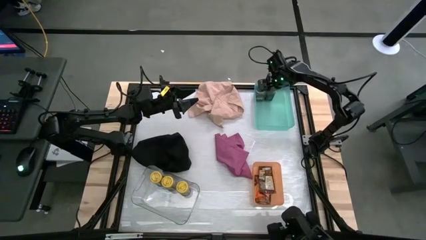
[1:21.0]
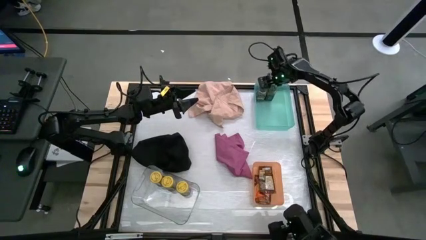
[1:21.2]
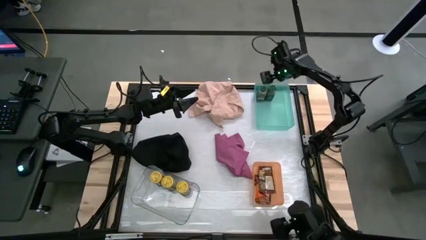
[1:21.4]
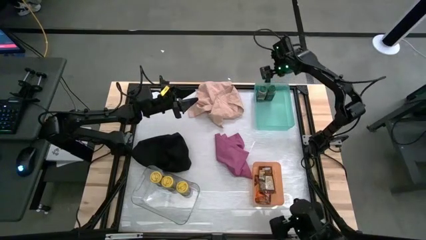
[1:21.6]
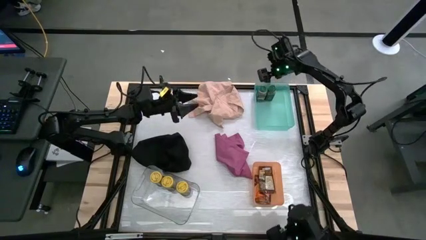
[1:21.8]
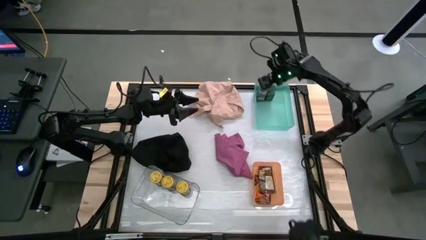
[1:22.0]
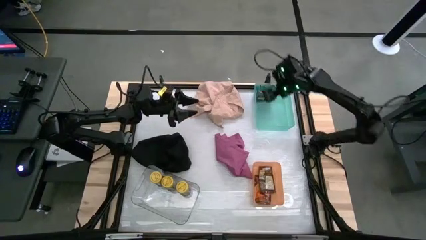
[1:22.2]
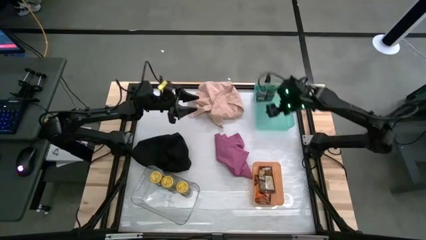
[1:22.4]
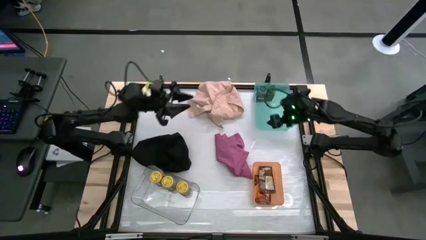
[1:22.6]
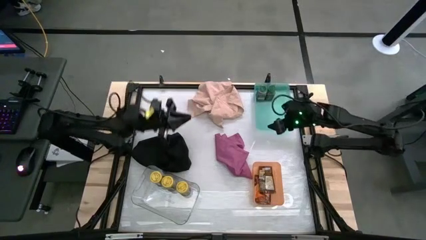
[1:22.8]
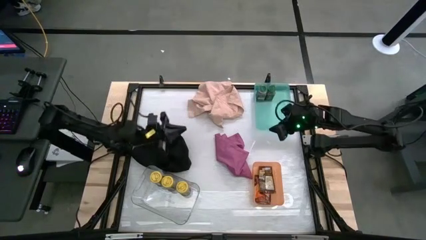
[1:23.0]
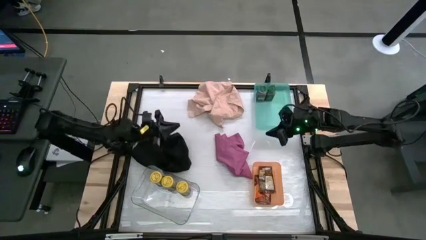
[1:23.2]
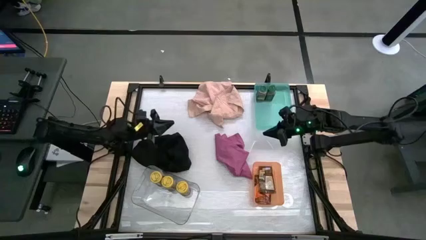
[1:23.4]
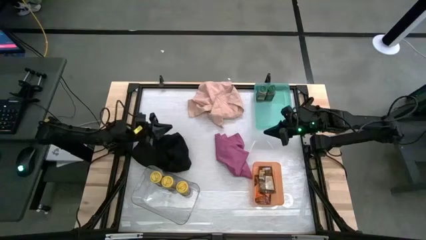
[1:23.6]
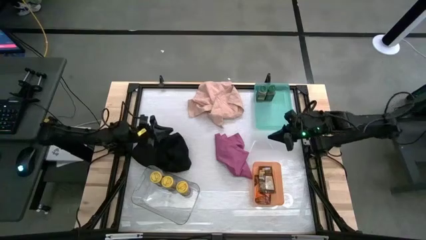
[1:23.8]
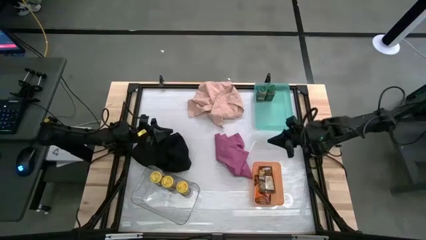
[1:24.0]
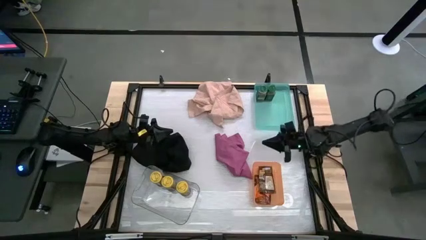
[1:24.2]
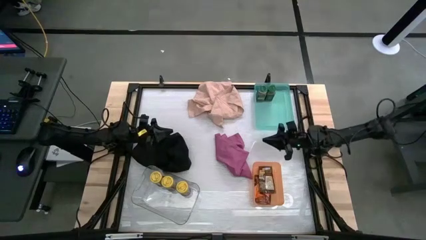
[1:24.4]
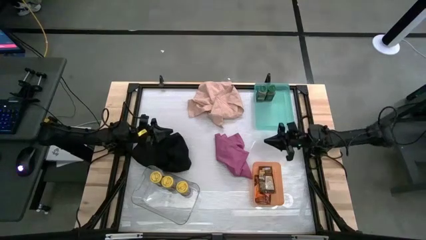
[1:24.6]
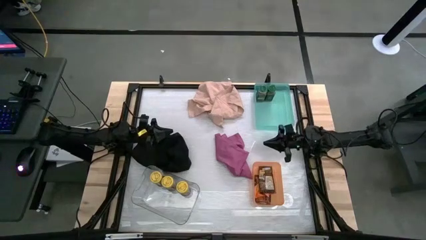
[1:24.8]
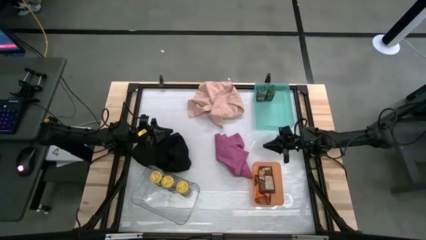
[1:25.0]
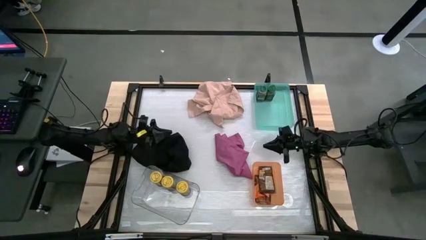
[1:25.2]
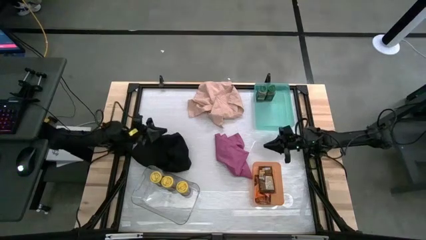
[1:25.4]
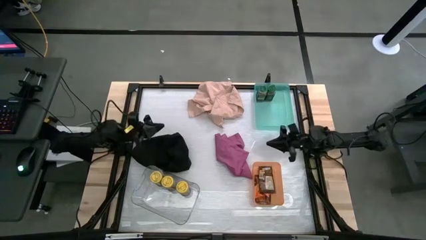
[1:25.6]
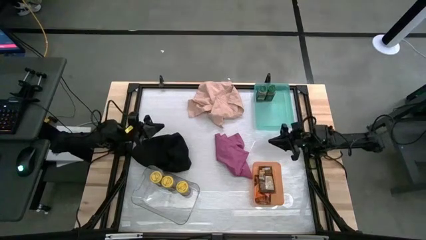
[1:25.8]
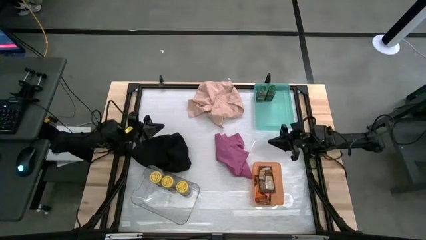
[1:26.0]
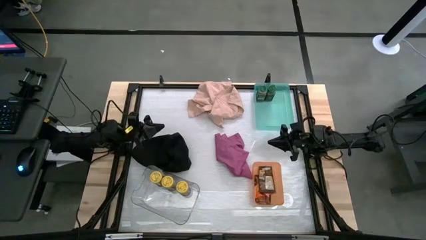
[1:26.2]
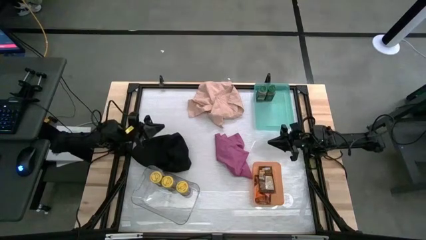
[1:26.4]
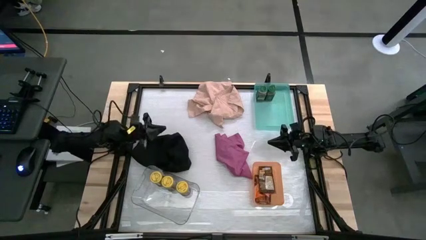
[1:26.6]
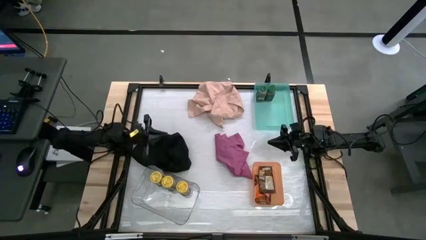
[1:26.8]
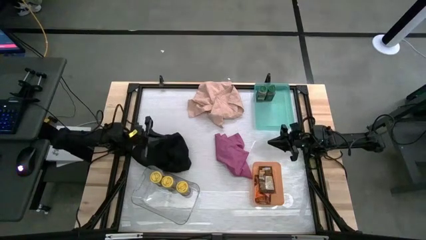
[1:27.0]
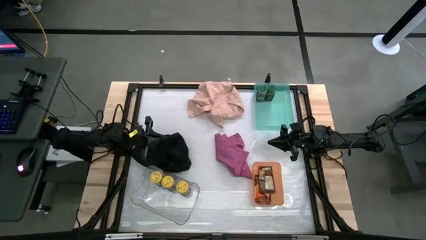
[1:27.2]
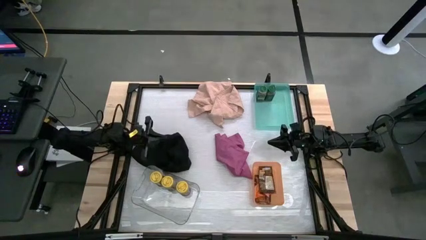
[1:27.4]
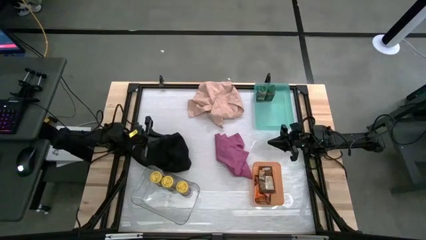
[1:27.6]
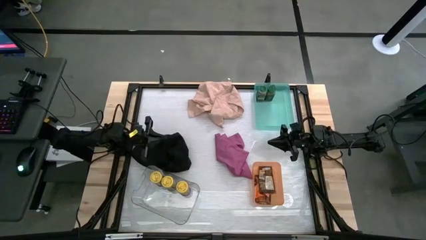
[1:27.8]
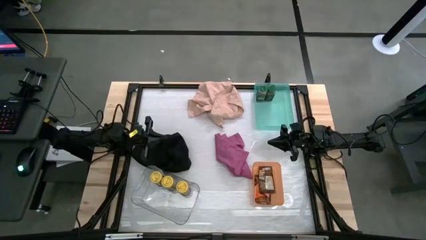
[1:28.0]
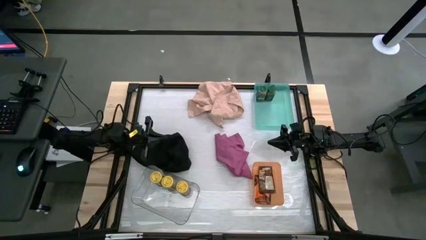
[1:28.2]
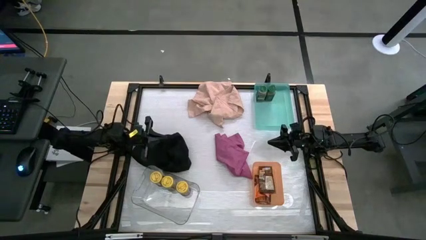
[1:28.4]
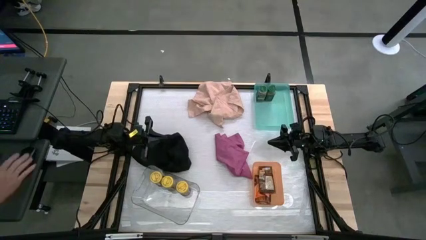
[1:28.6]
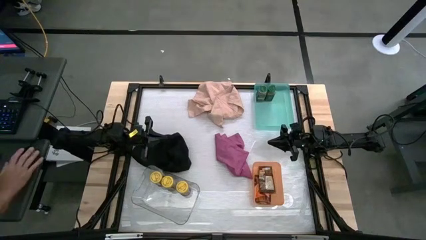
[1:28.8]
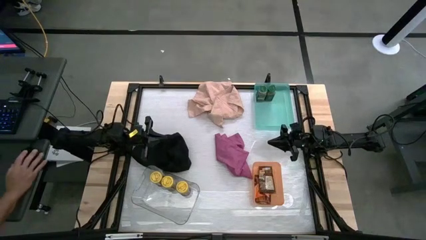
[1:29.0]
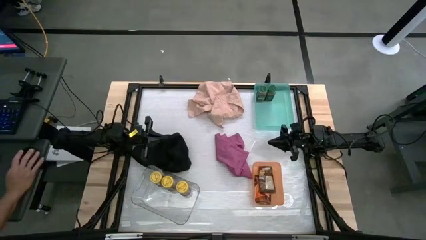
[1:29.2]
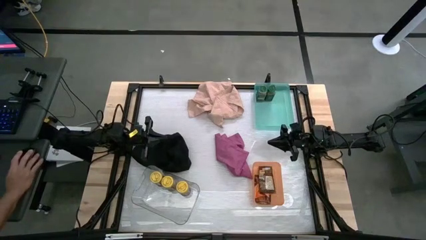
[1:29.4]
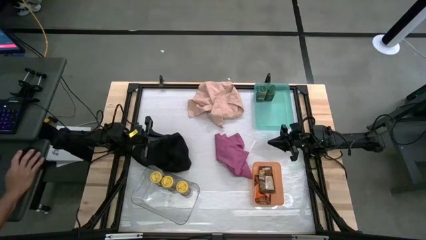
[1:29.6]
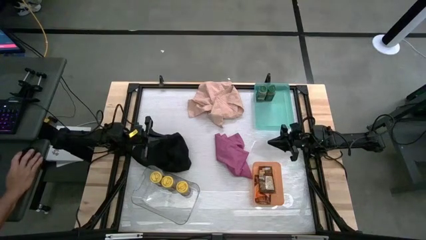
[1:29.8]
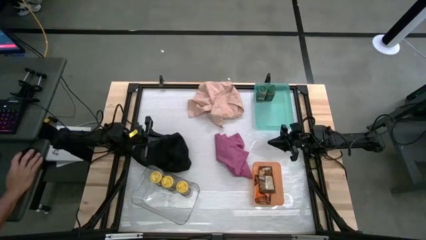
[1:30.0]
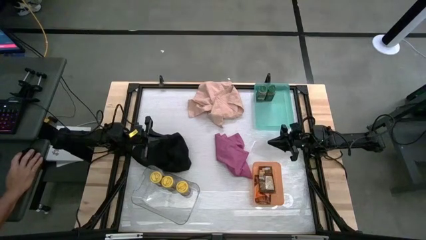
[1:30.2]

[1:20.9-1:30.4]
Task: Sort spices by type
Return to Home Position

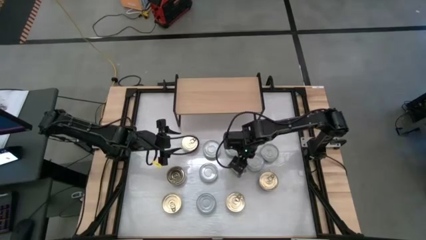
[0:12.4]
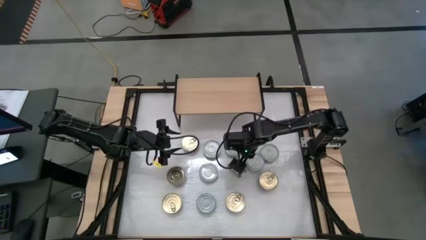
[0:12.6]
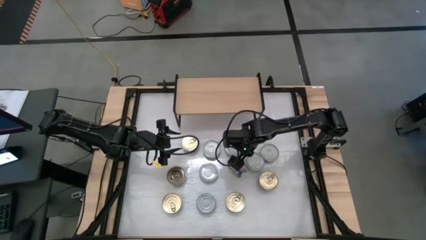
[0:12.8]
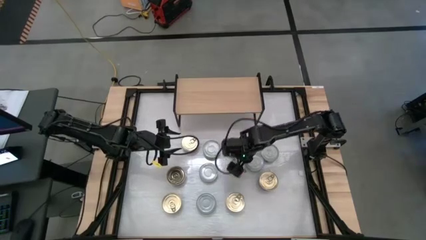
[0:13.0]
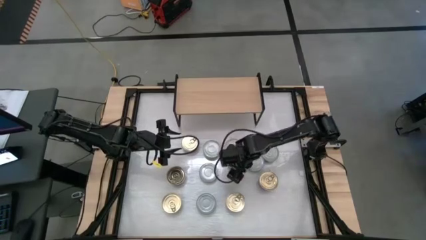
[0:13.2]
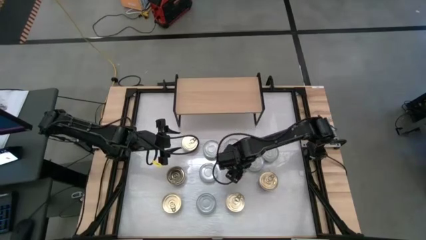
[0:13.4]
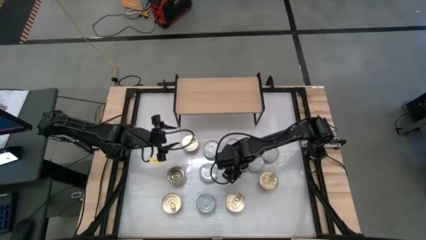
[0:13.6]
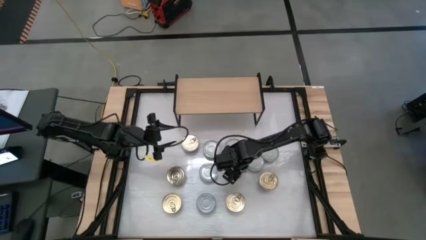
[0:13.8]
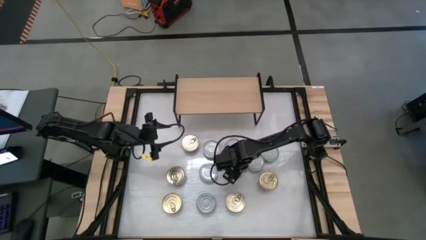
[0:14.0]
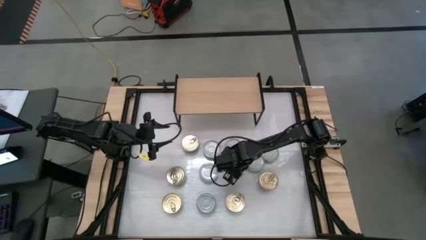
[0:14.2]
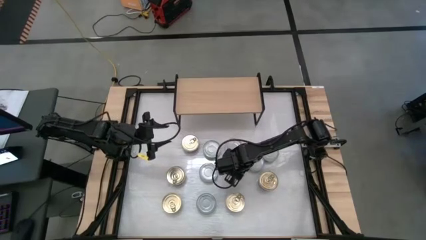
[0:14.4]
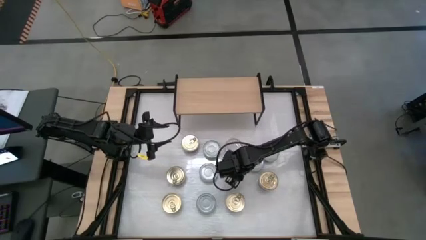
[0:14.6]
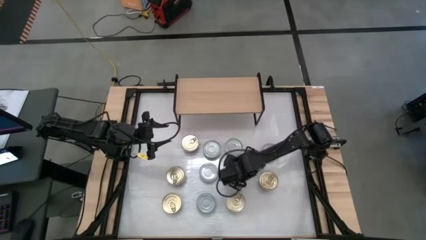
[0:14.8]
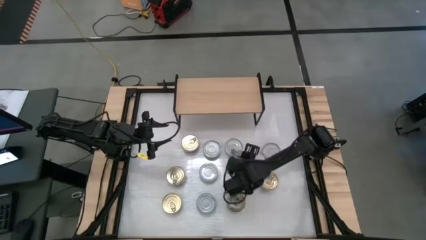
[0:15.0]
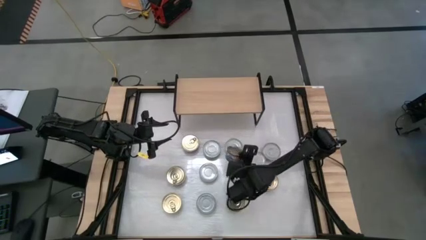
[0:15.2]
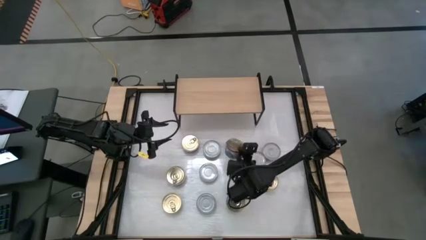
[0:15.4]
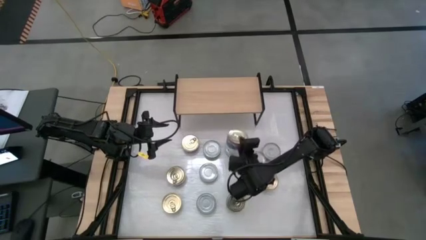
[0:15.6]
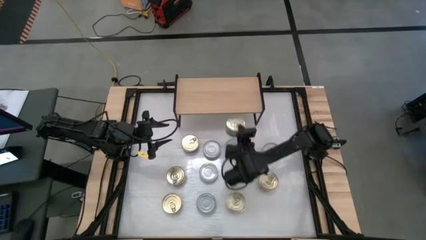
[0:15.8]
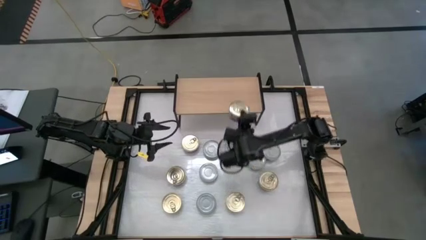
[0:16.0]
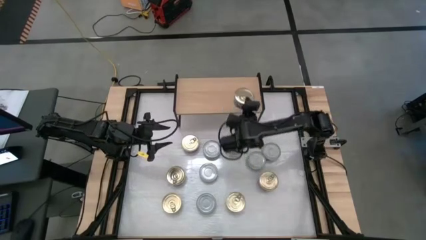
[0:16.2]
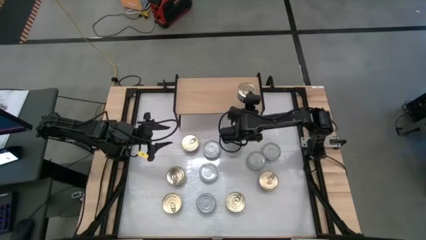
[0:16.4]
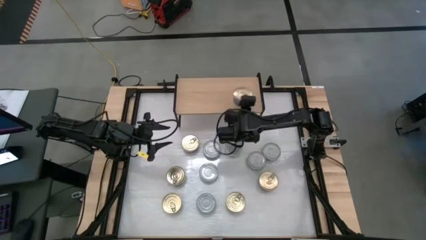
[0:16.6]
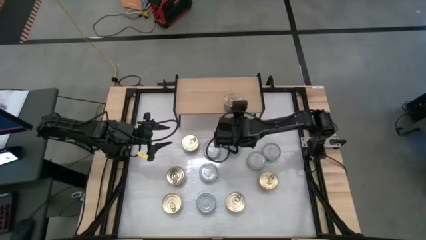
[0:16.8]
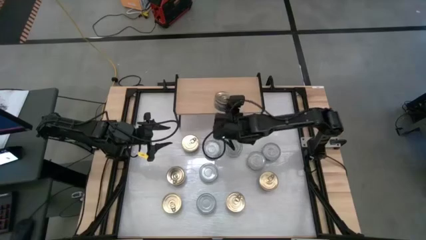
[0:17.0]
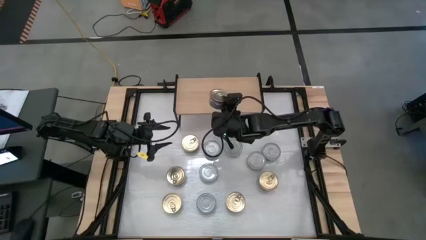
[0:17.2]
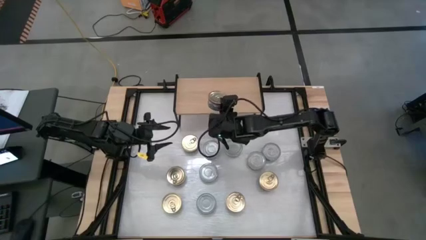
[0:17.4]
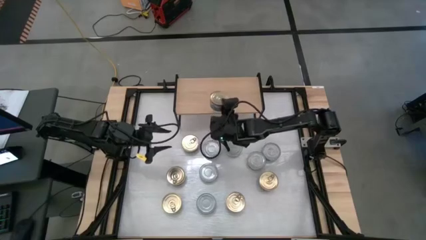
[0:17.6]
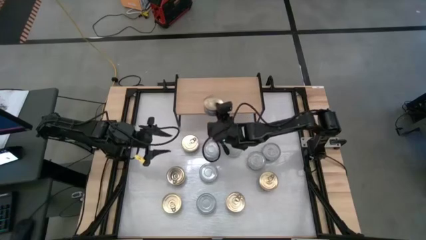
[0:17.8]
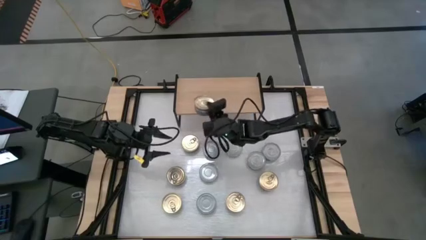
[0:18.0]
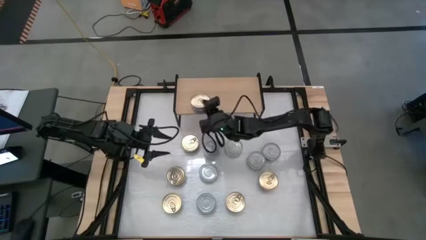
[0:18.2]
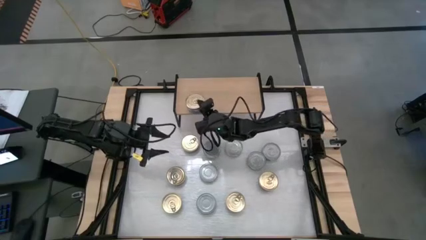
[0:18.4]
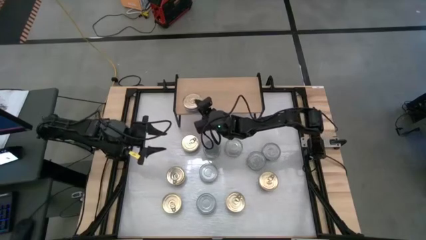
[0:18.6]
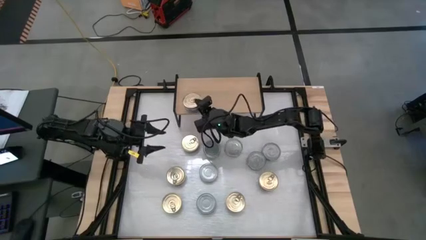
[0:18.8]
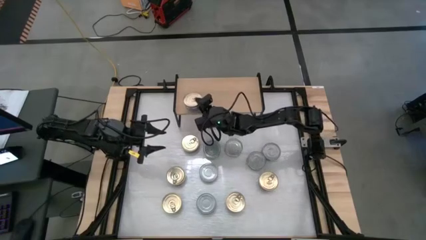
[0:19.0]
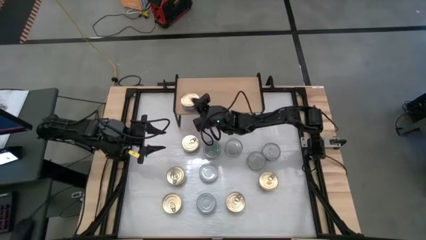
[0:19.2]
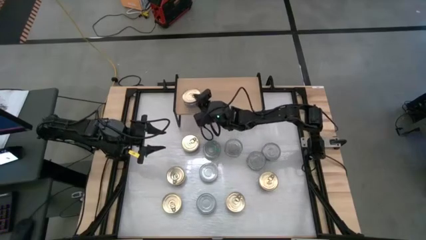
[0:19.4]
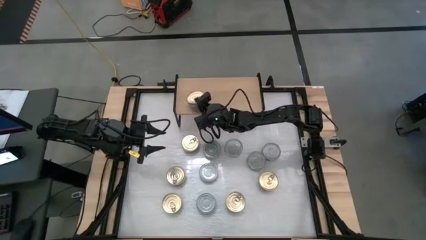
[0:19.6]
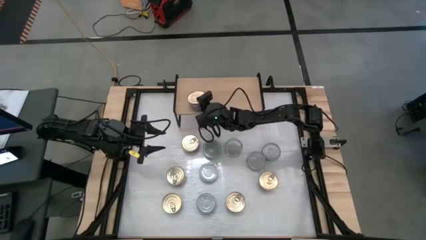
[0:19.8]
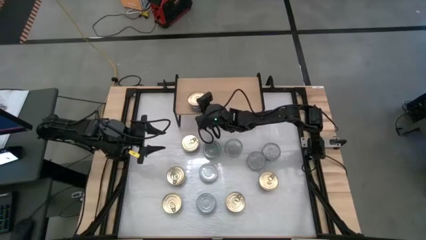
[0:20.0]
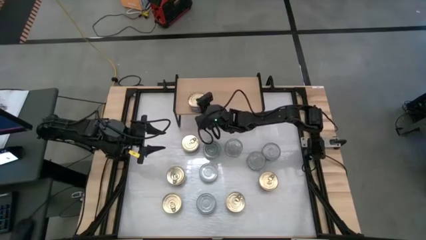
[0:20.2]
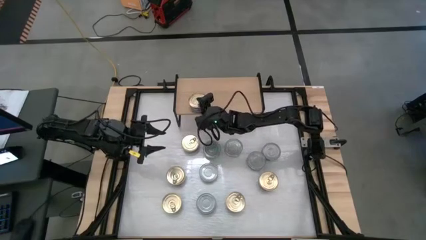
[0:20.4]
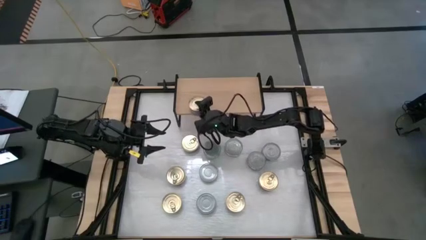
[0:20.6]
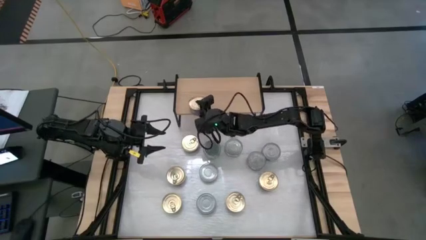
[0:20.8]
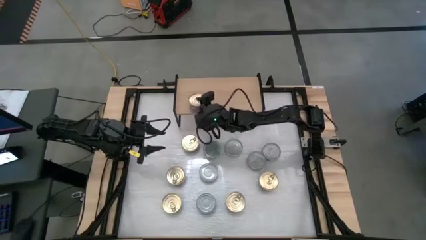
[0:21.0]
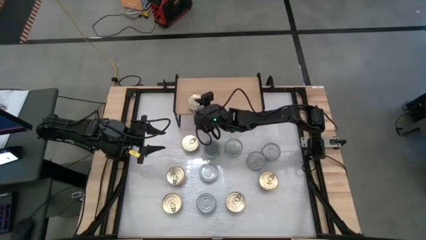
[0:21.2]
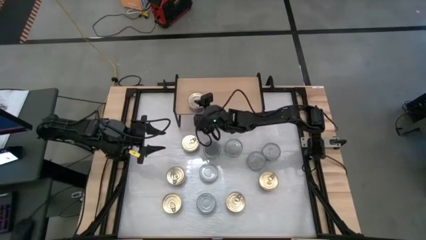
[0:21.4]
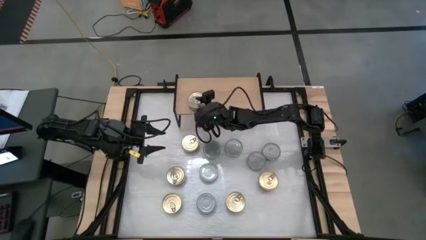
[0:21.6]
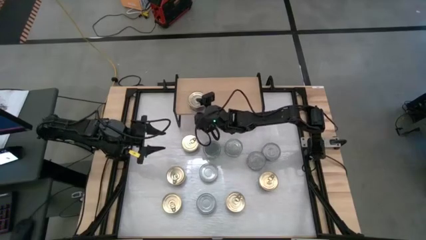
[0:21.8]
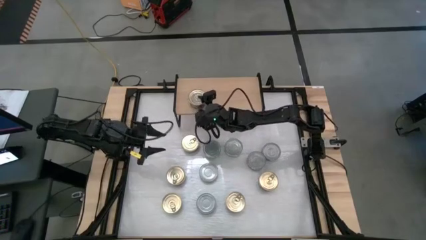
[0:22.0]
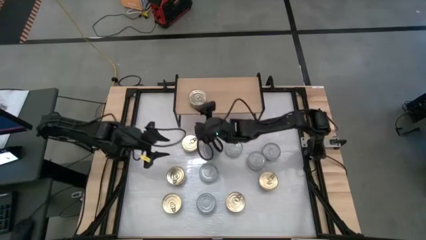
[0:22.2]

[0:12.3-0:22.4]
Task: Stack canned seafood by type on shelf
Put the blue tuna can on the shelf
